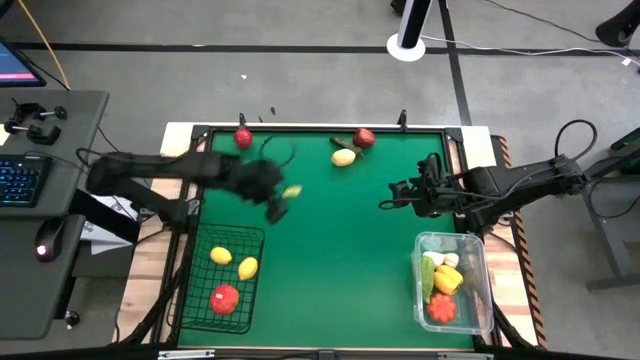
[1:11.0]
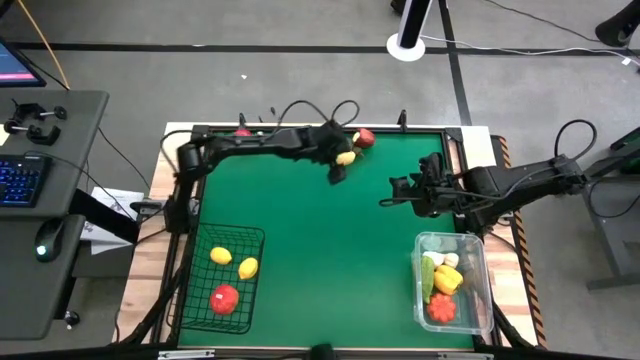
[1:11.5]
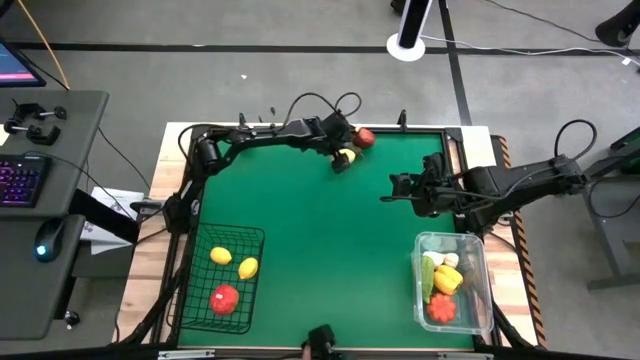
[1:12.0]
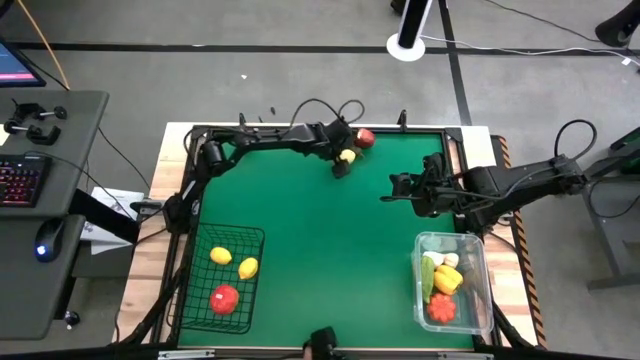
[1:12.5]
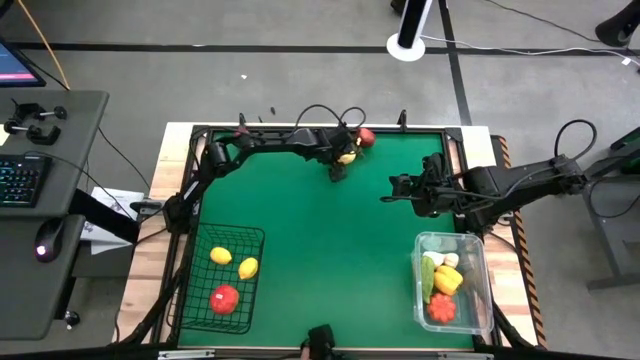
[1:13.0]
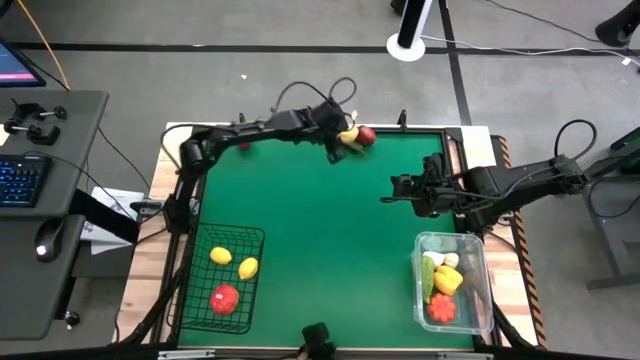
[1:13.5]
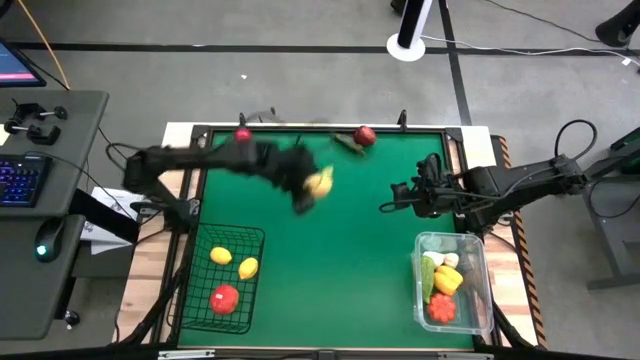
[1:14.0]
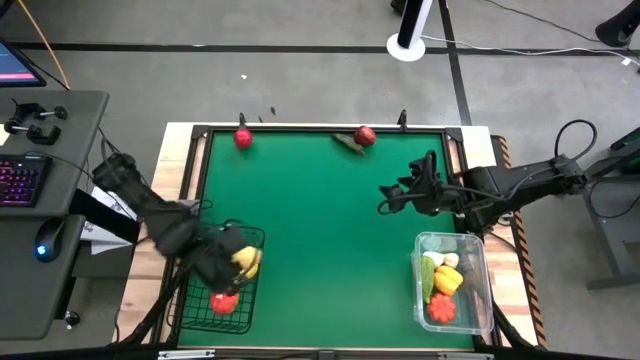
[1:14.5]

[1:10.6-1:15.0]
Task: Sort produce into baskets
Put the yellow lemon into the black wire basket

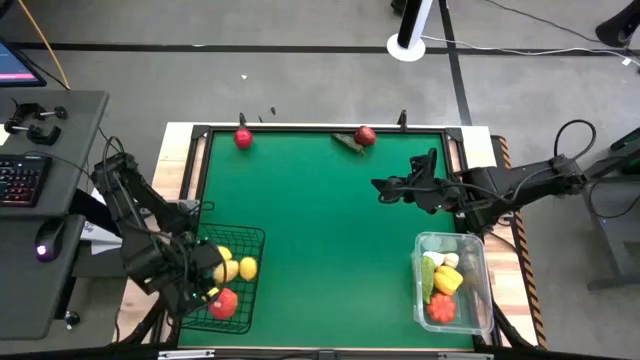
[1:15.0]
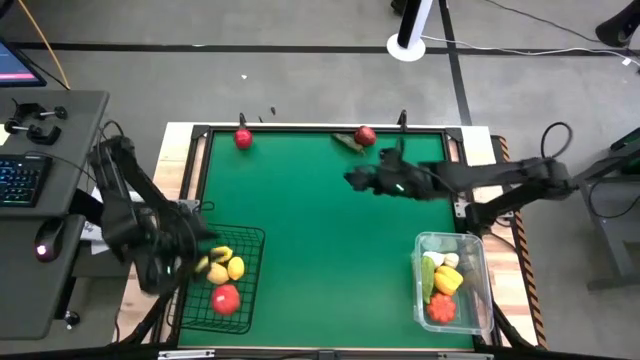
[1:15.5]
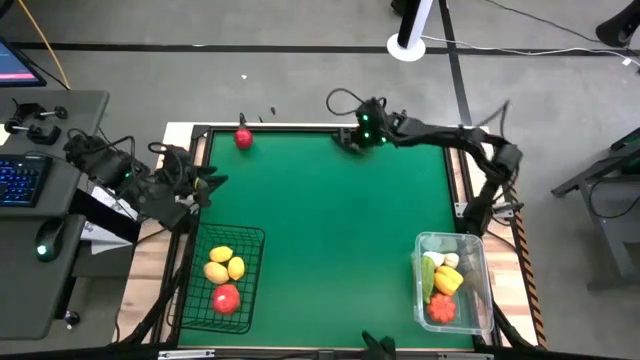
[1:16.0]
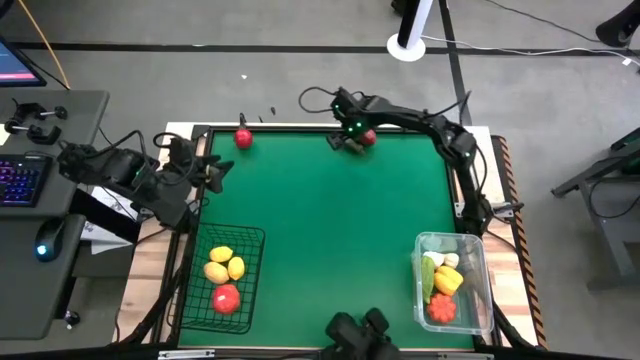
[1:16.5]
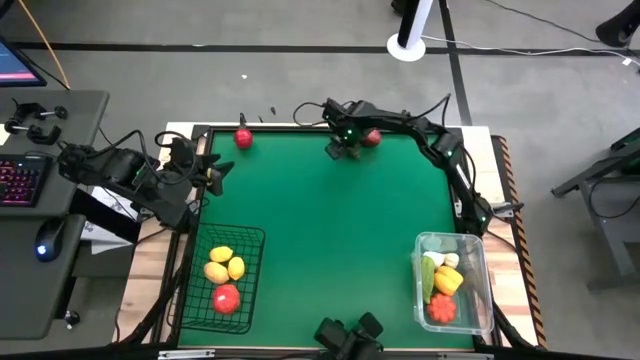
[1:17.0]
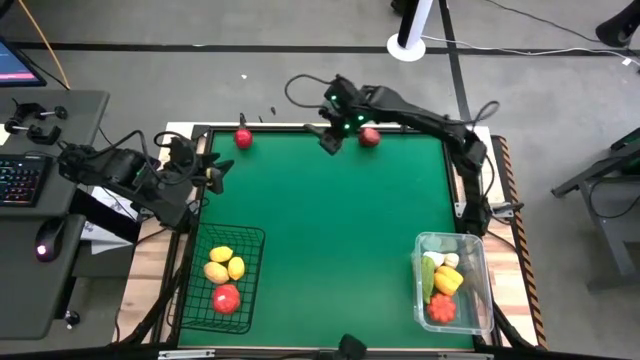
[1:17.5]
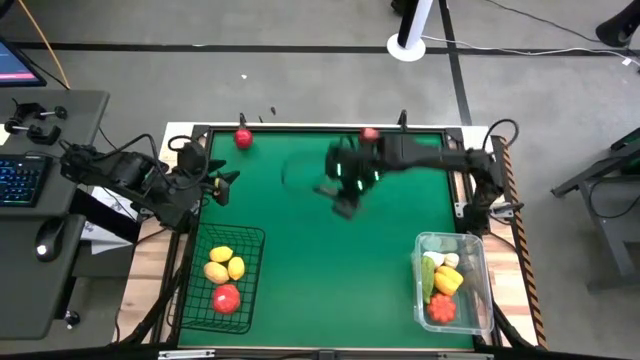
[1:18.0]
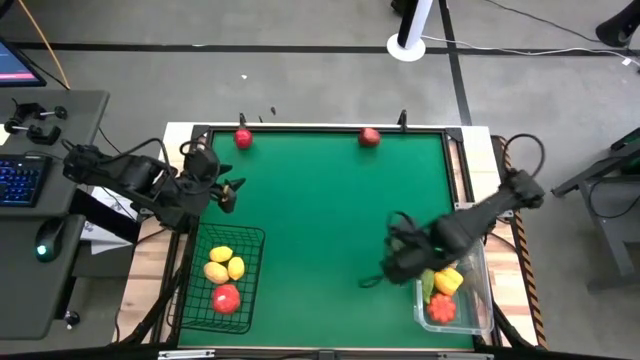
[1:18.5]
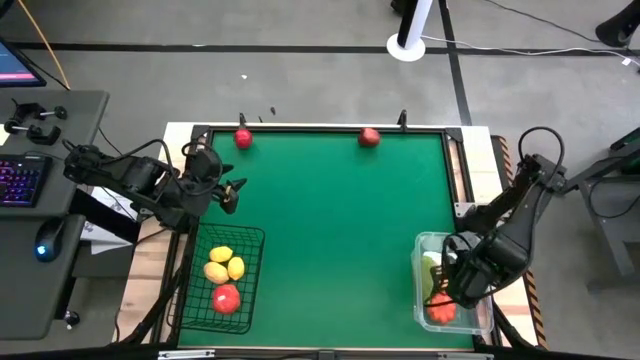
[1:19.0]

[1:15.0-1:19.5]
Put the green chili pepper into the transparent bin

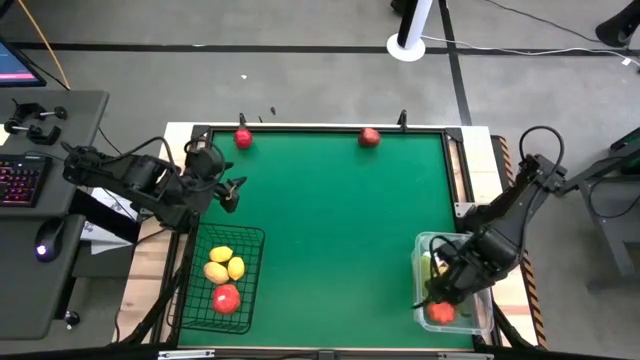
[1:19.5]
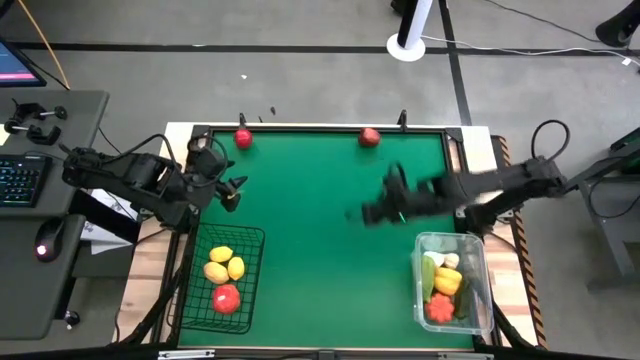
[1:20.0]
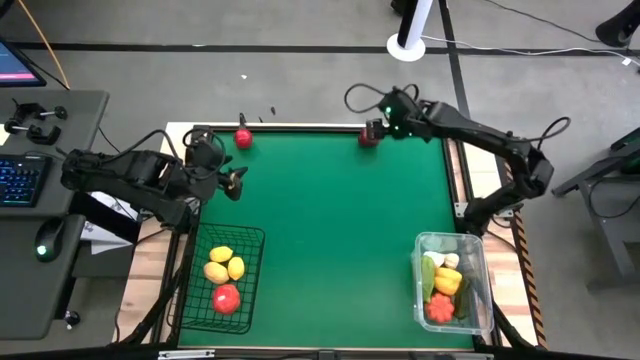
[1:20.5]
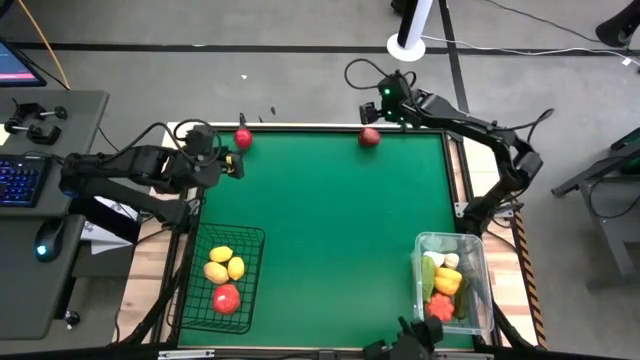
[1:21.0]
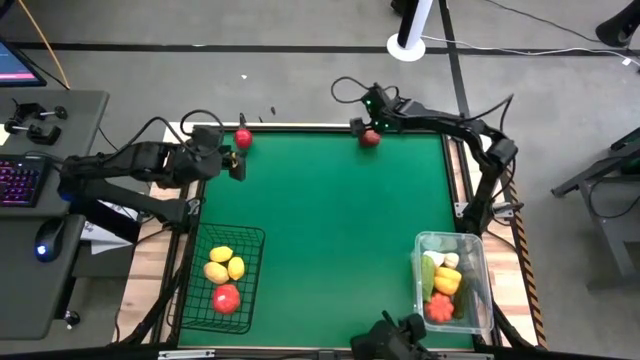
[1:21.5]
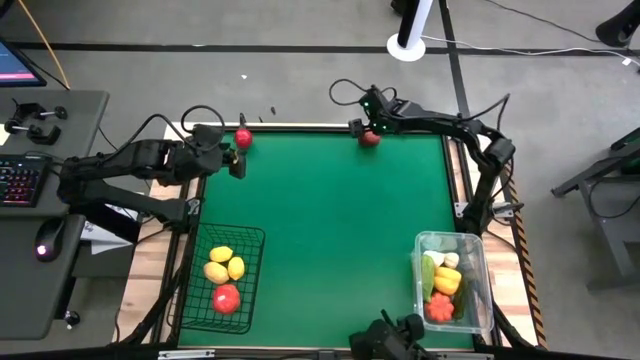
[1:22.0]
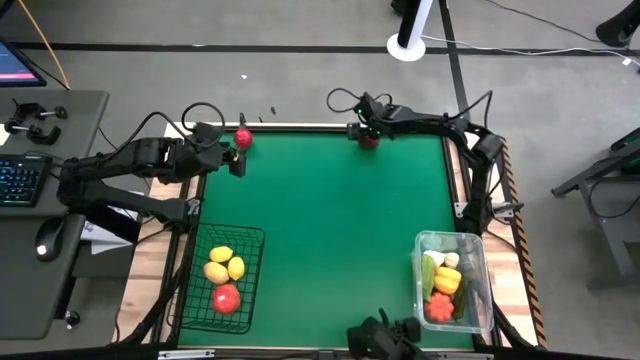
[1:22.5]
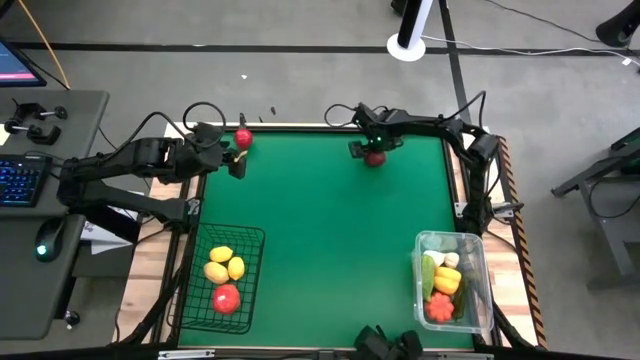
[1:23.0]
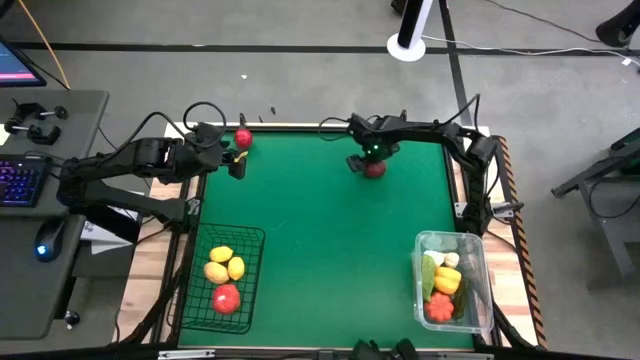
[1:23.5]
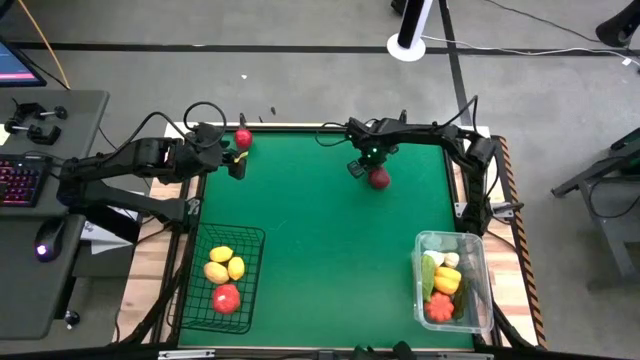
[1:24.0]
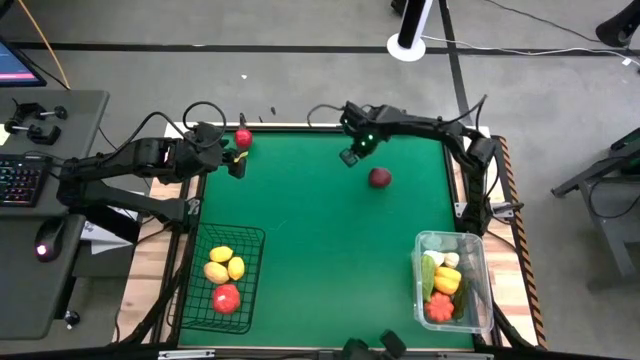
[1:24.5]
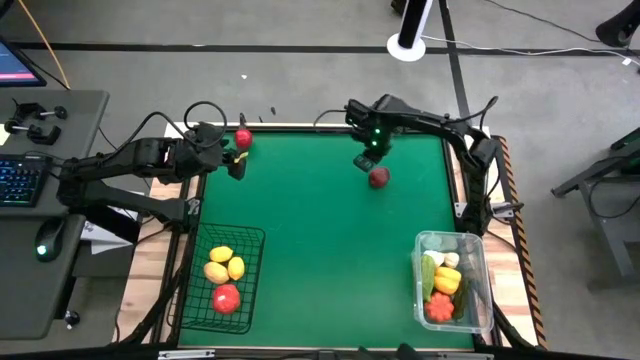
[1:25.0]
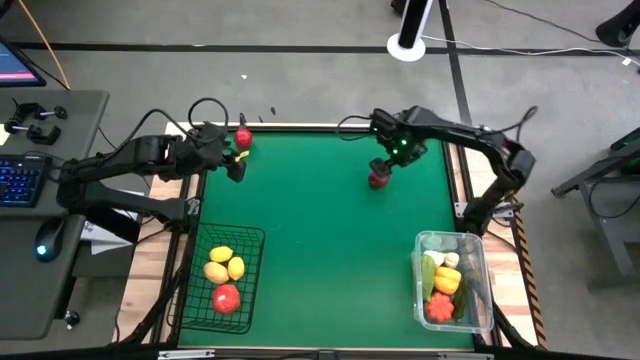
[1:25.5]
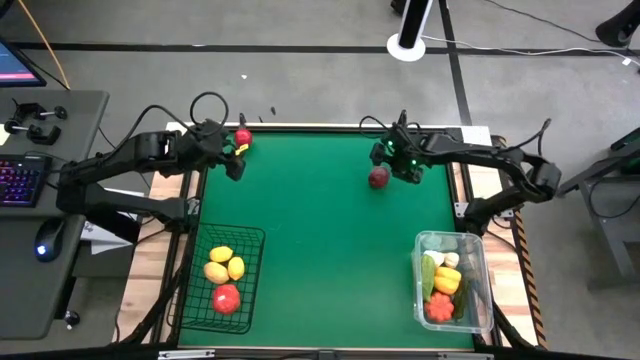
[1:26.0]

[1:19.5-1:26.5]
Put the red apple into the black wire basket

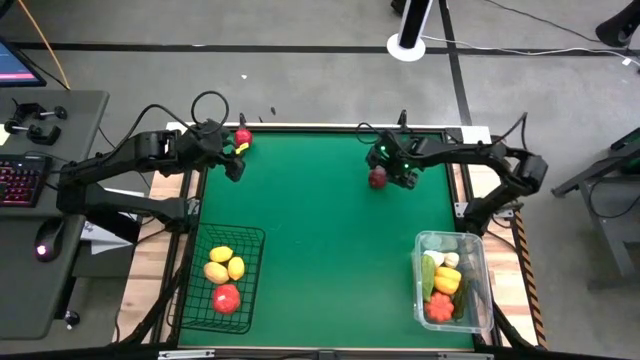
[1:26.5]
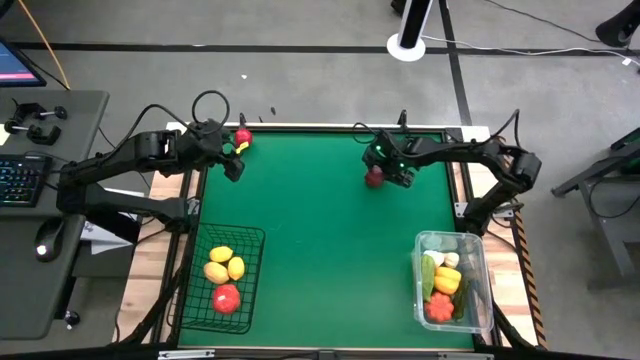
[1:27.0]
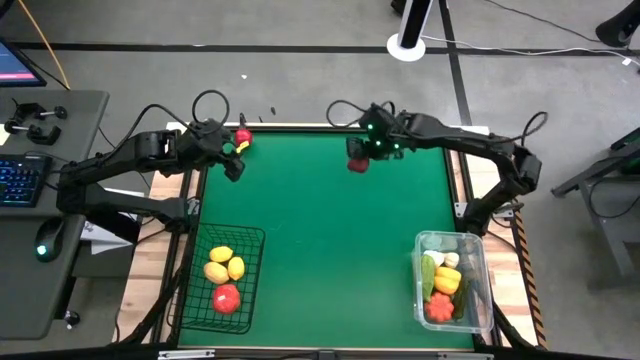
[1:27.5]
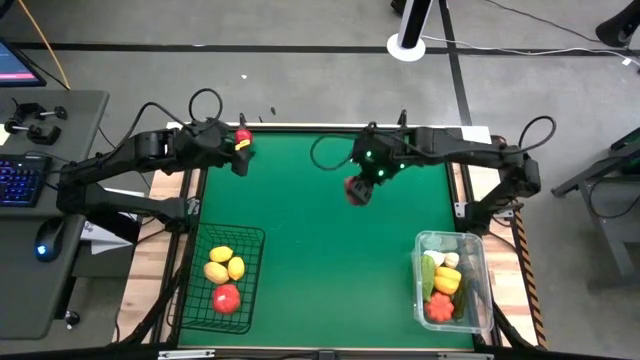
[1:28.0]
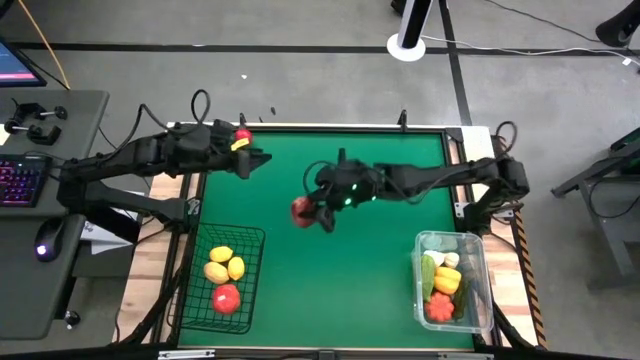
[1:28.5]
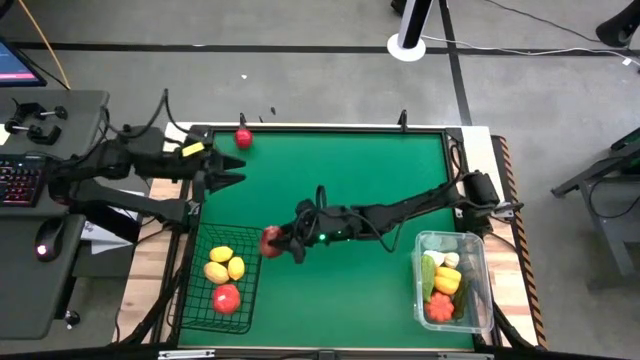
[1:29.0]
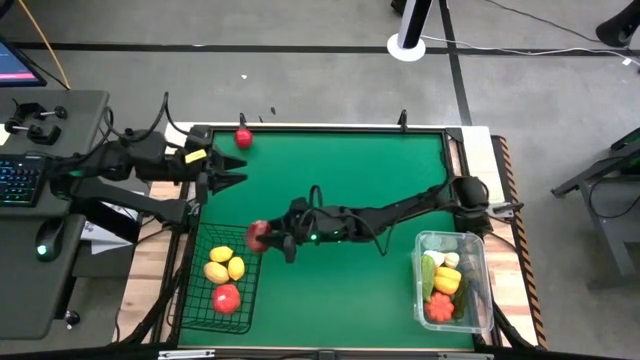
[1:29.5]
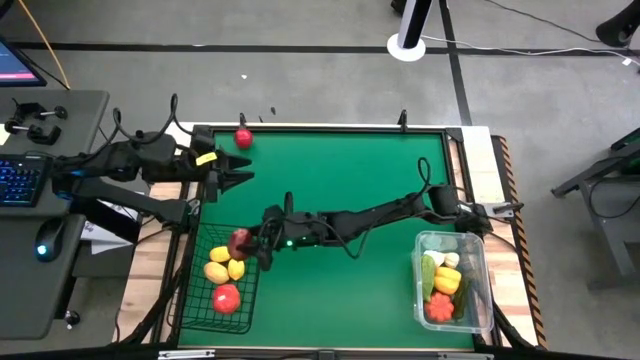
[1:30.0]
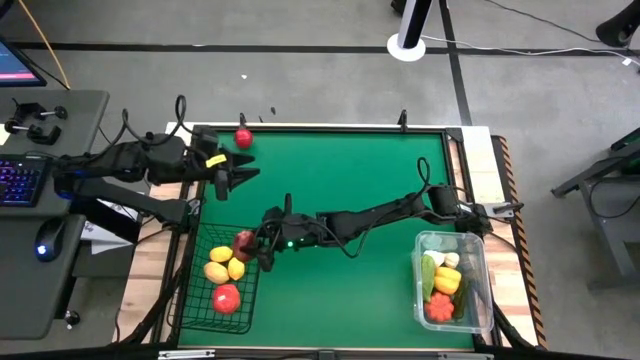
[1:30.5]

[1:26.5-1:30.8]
Put the red apple into the black wire basket
